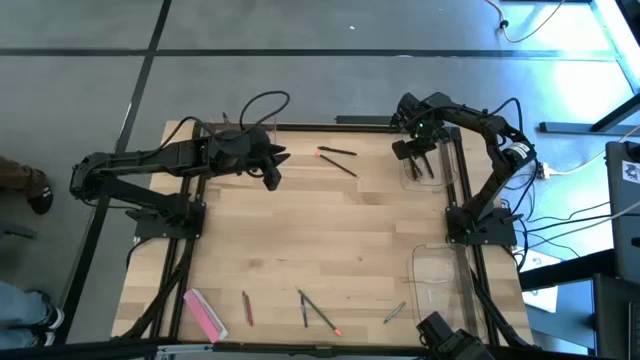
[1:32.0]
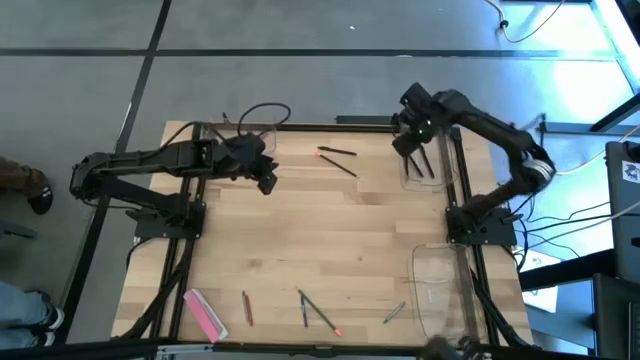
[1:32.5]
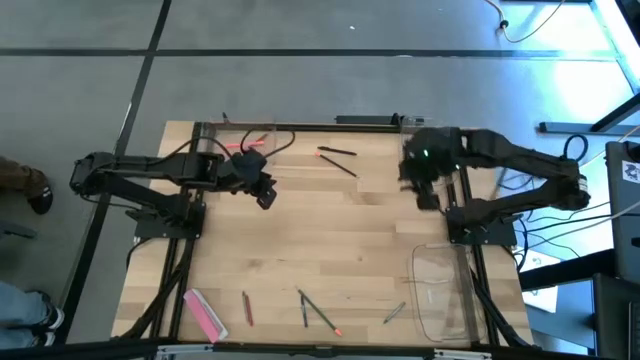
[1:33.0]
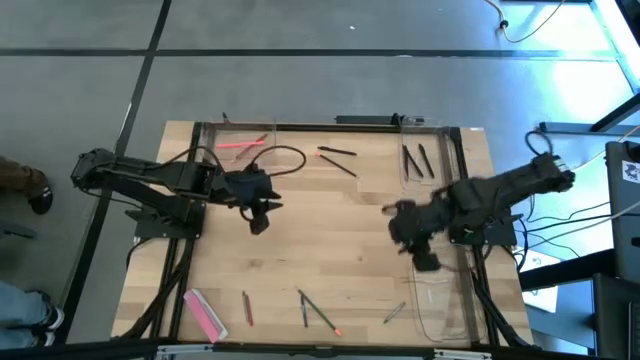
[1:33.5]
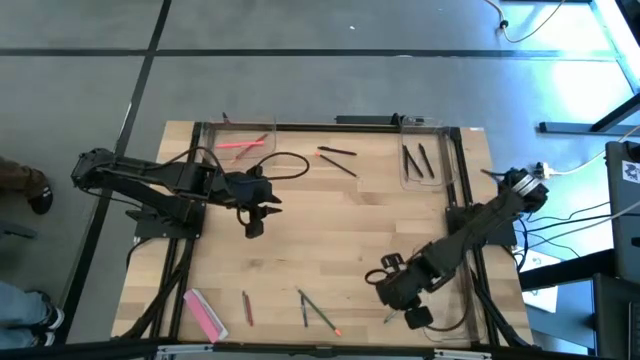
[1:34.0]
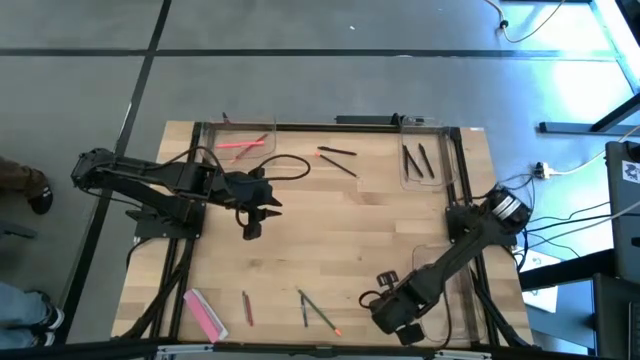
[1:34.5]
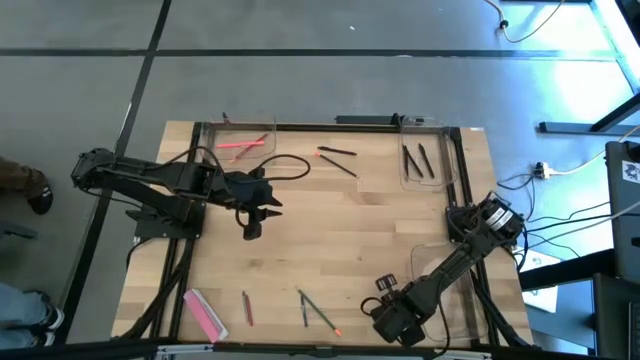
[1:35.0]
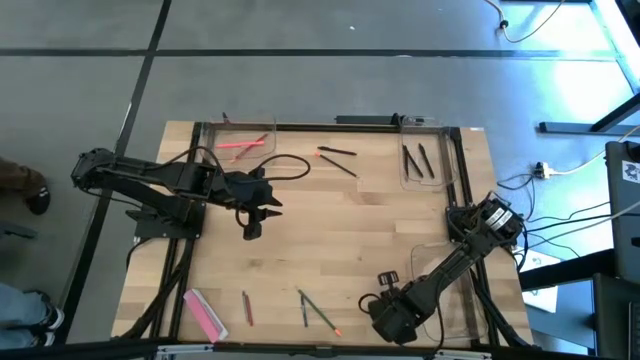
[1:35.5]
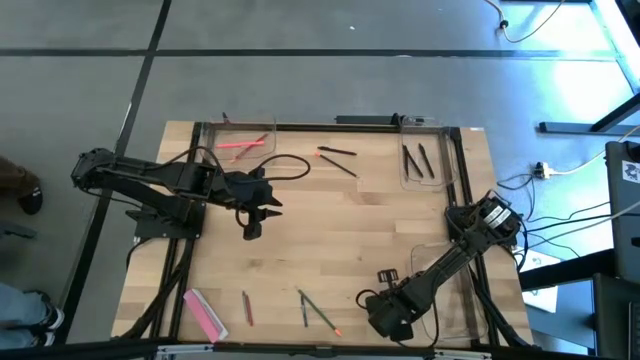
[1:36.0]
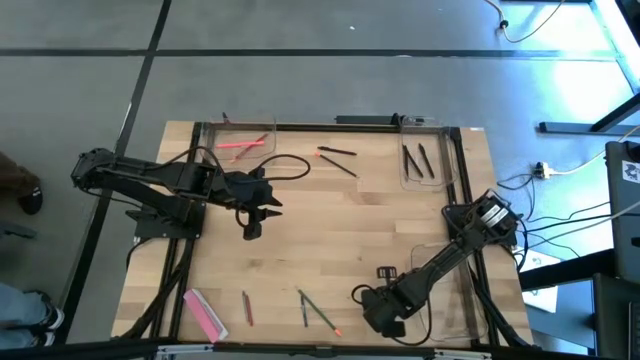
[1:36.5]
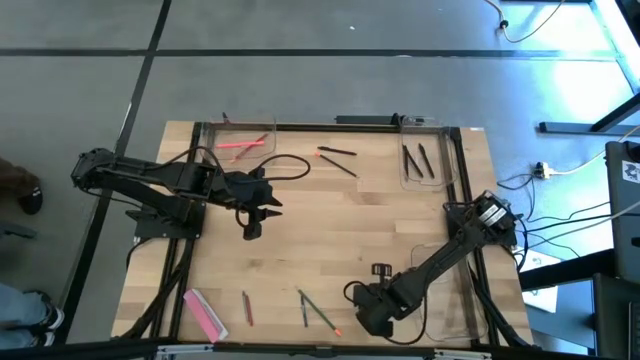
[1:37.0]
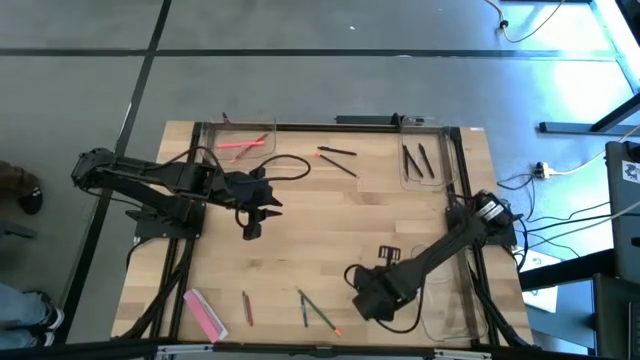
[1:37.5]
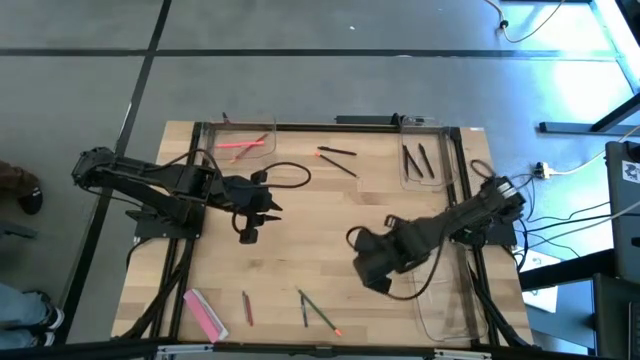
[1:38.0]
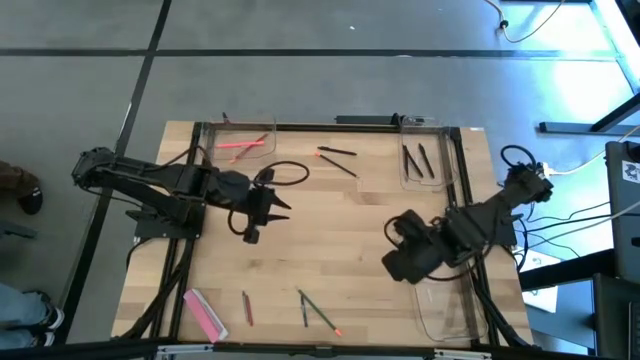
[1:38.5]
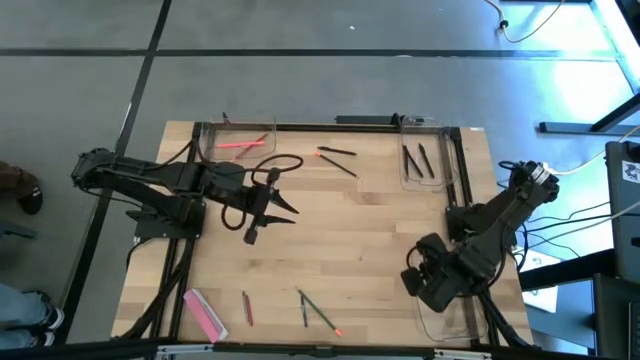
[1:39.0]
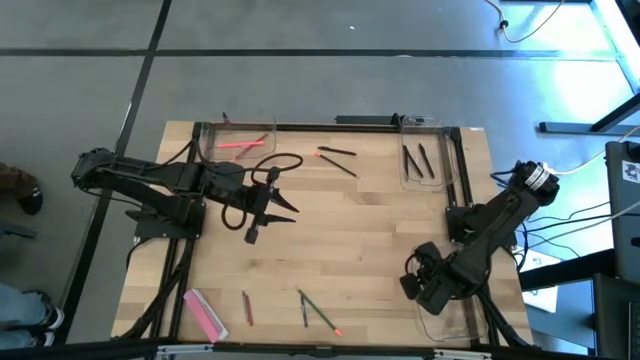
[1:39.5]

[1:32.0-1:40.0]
Task: Sort crayons/erasers/pens/pencils in bins
Put the gray crayon into the bottom transparent bin

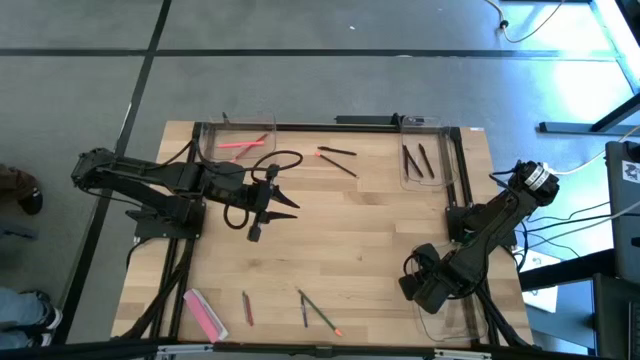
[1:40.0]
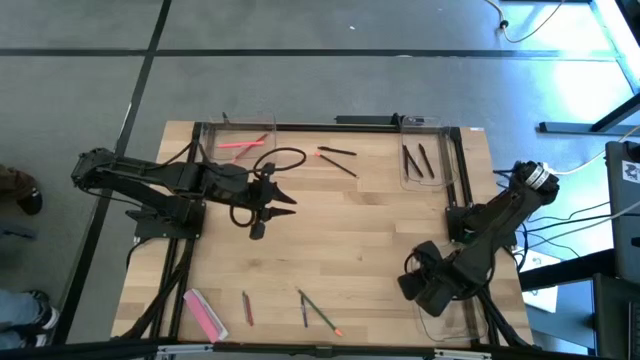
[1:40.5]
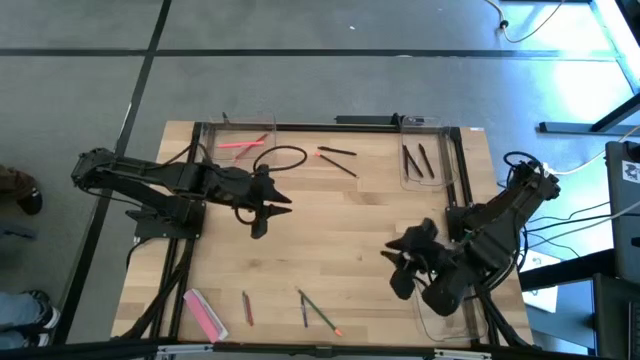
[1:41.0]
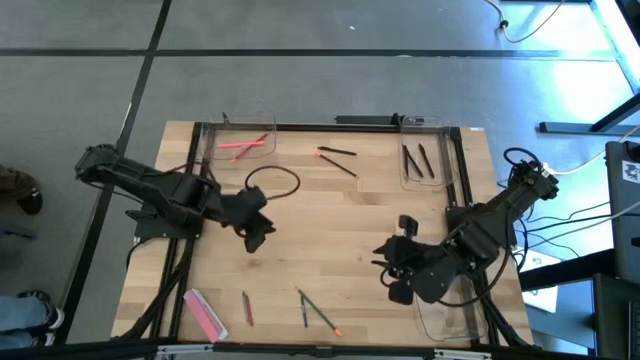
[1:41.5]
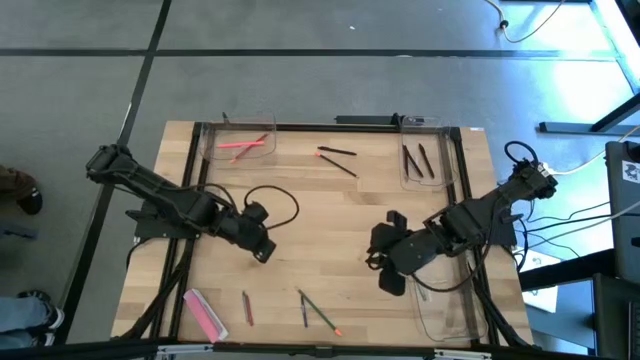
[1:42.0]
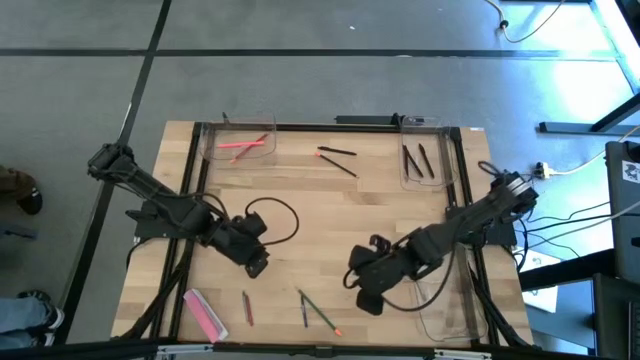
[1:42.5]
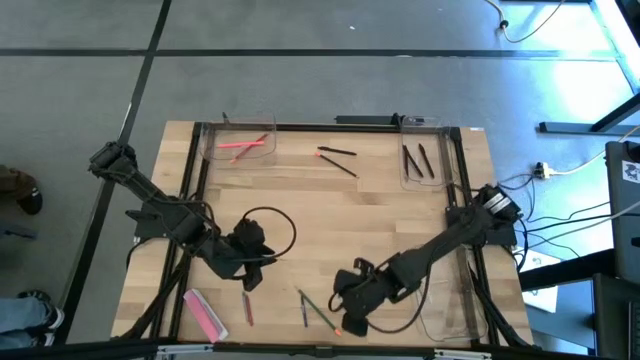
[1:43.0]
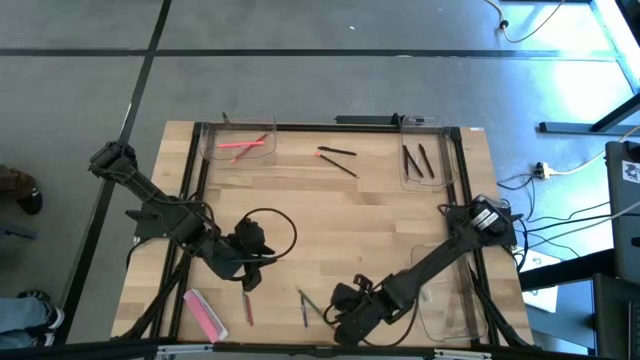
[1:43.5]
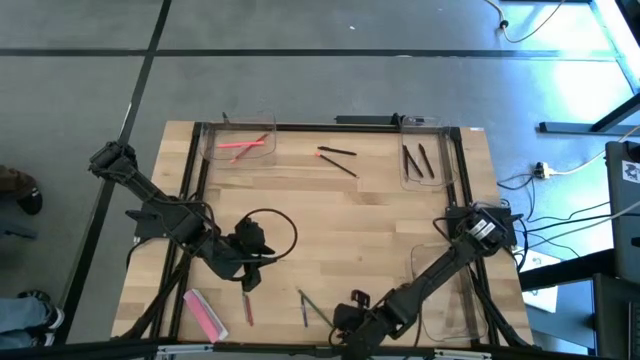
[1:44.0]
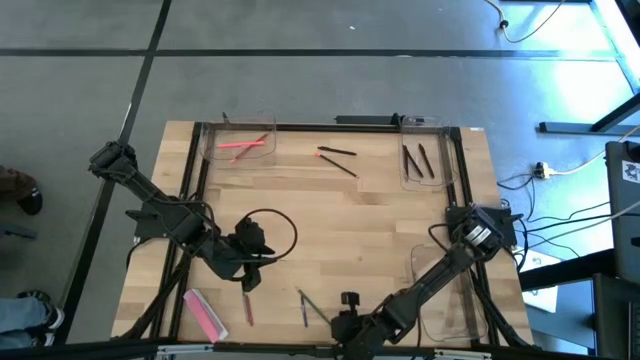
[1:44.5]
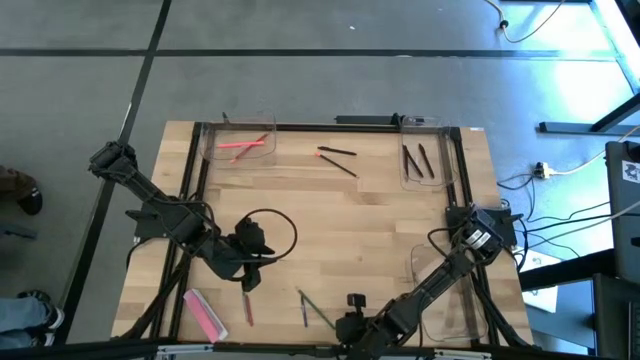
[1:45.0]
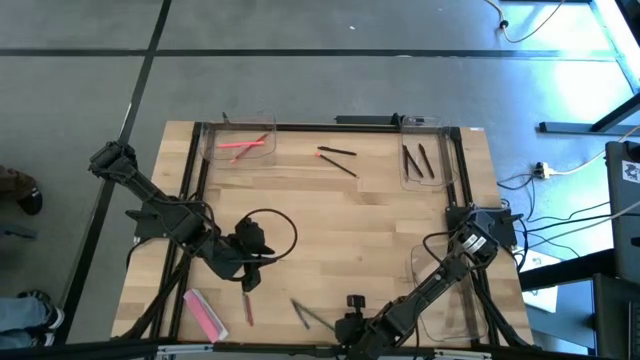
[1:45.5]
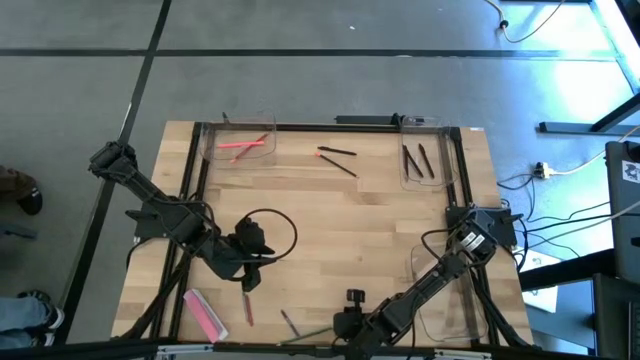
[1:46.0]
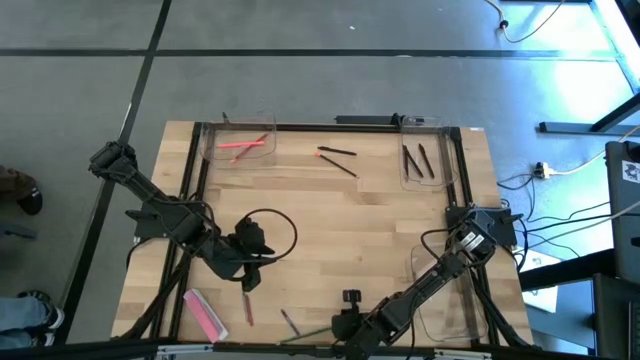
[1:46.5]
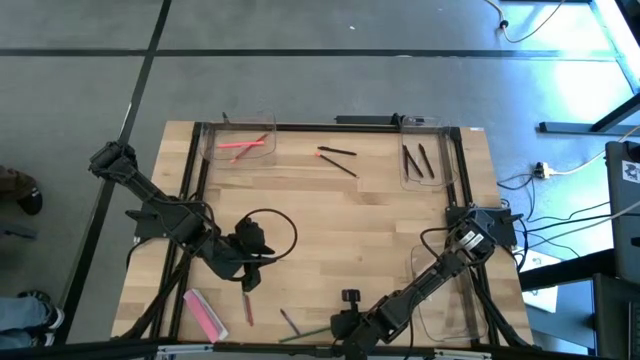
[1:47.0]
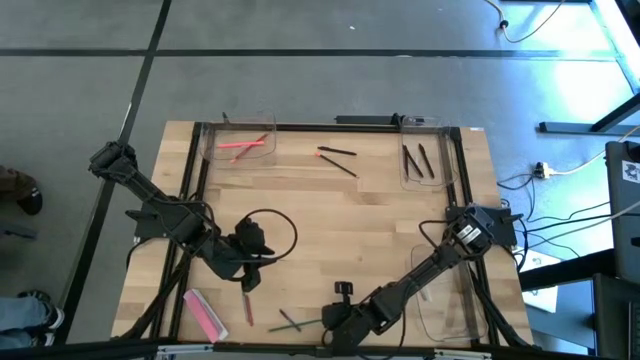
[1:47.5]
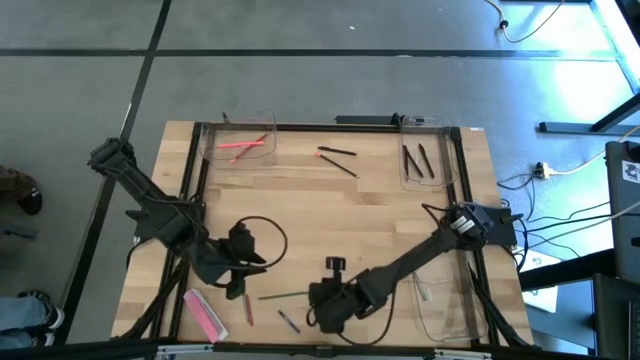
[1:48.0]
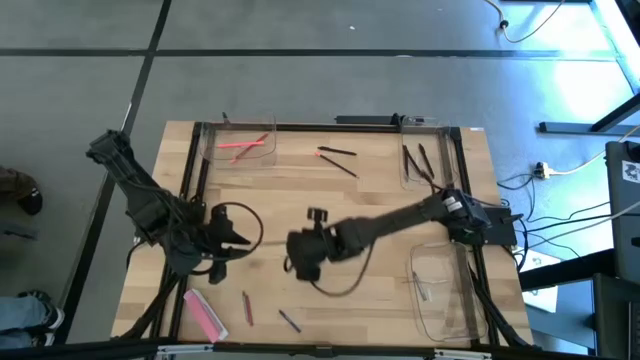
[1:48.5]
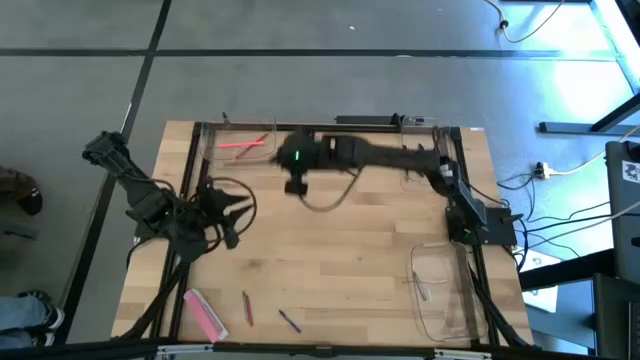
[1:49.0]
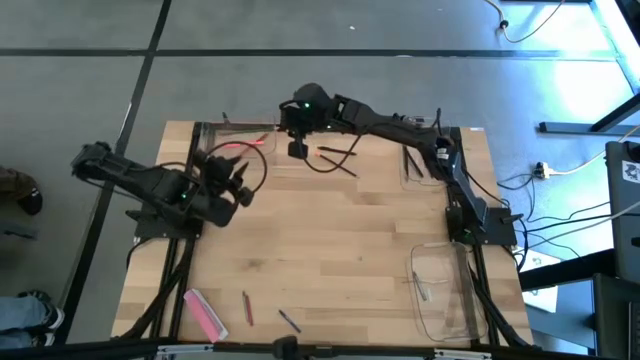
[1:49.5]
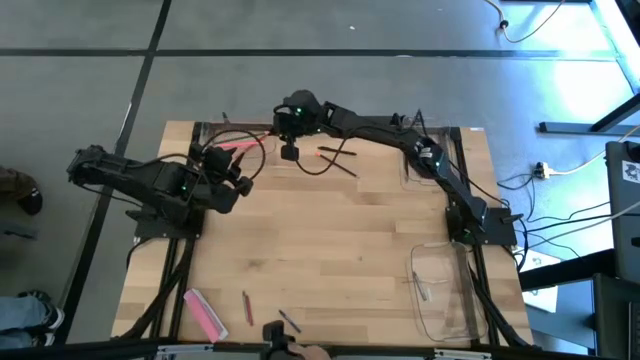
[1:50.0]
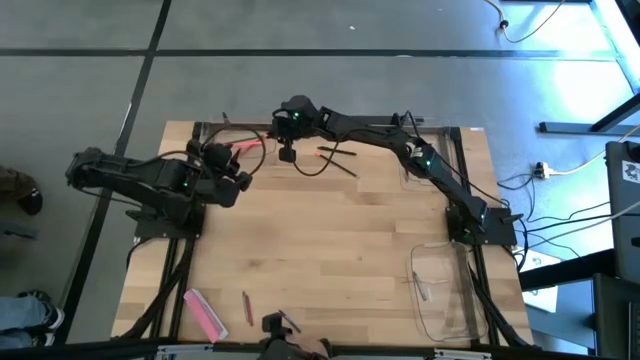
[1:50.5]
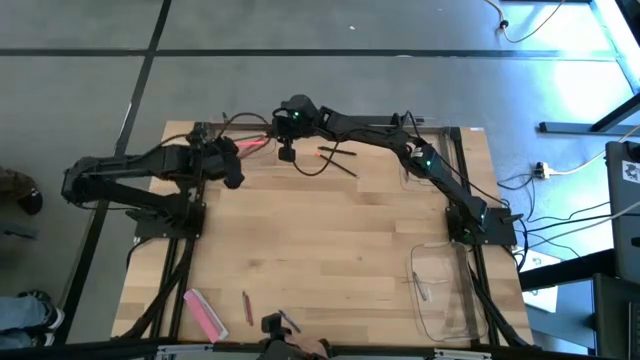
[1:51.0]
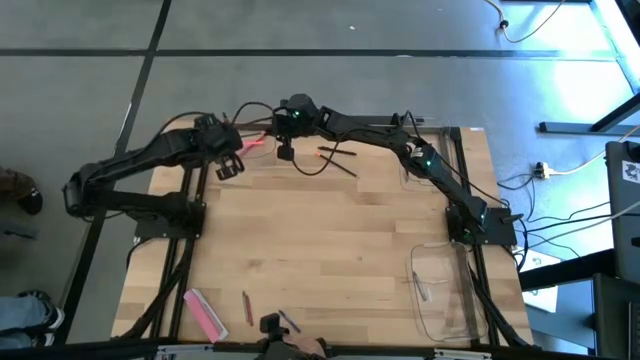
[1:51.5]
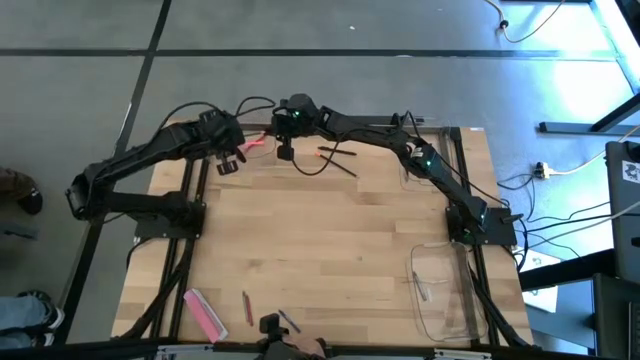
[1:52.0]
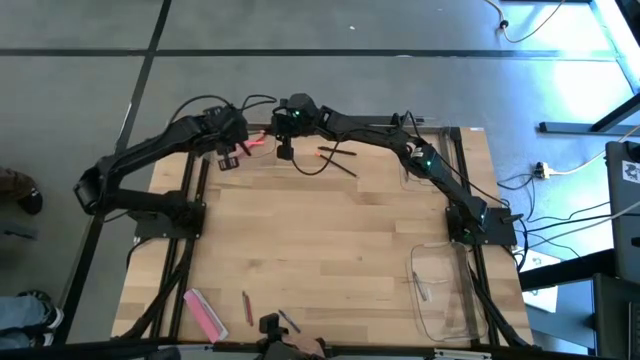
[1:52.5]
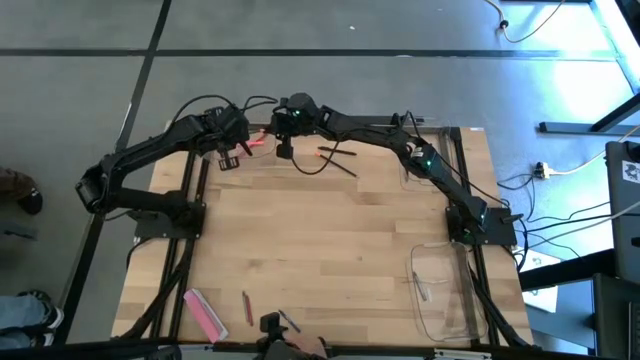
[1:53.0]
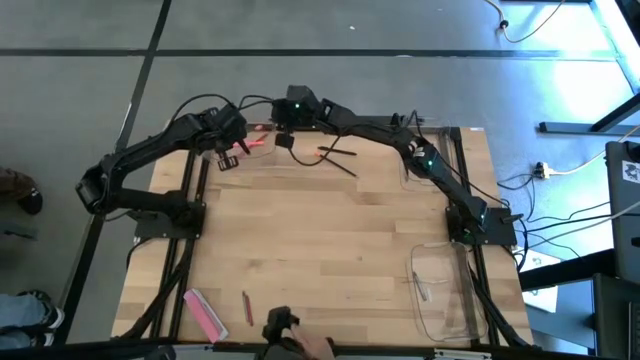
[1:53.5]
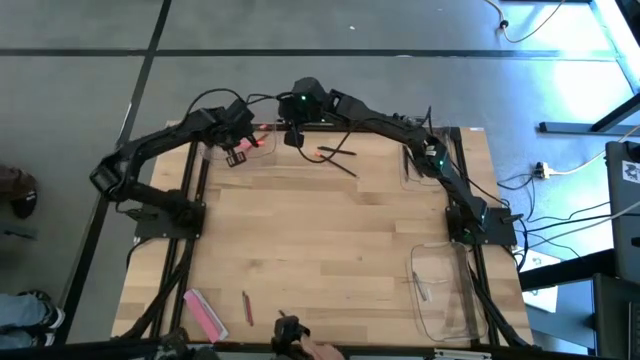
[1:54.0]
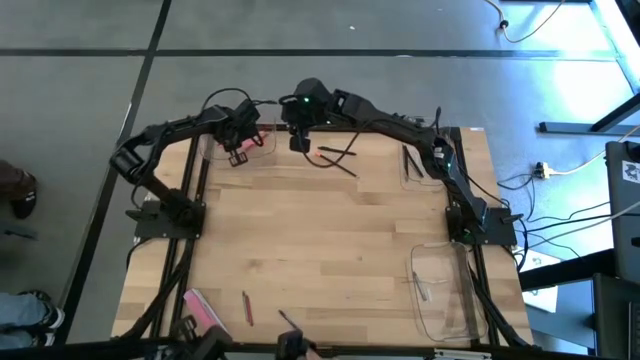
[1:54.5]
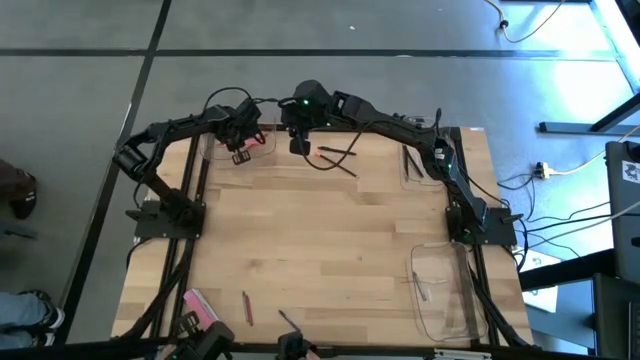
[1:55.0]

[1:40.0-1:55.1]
Put the green pencil into the top left transparent bin
